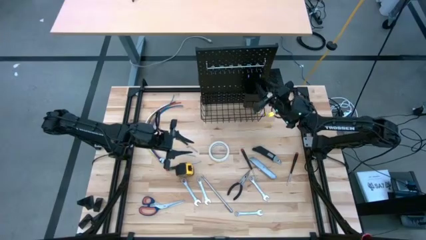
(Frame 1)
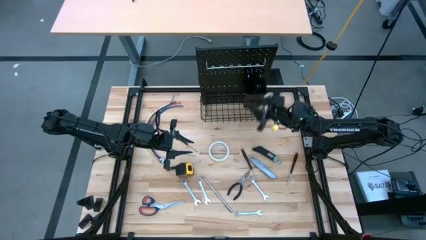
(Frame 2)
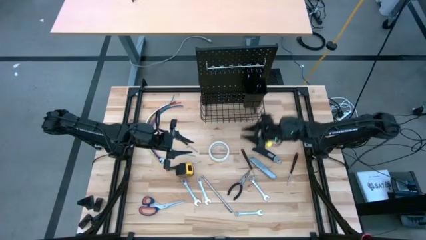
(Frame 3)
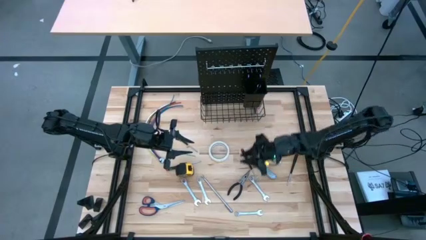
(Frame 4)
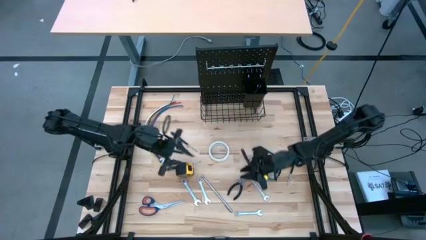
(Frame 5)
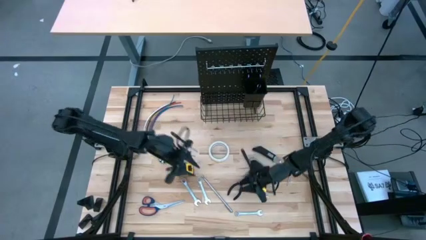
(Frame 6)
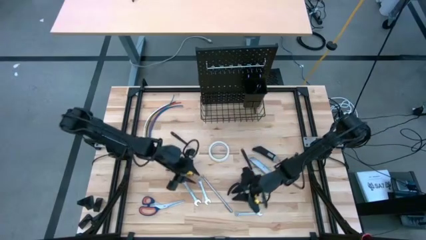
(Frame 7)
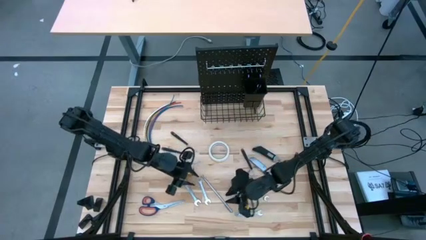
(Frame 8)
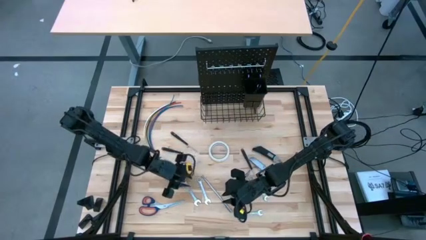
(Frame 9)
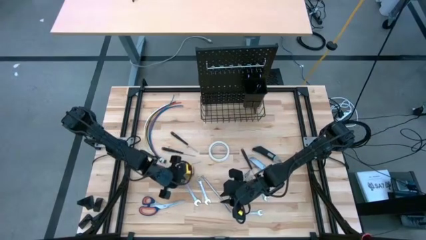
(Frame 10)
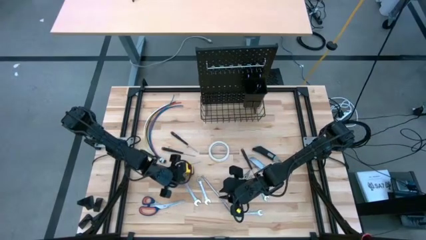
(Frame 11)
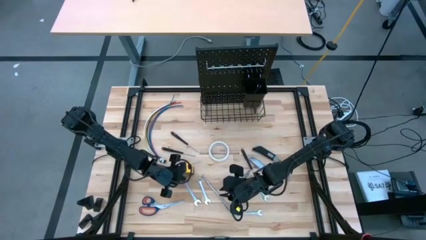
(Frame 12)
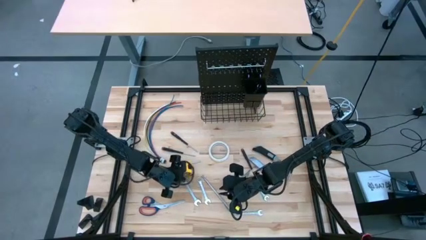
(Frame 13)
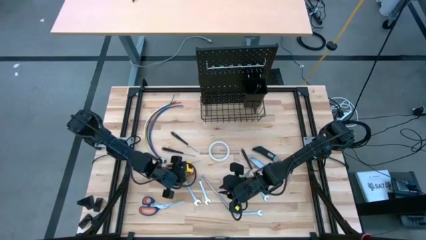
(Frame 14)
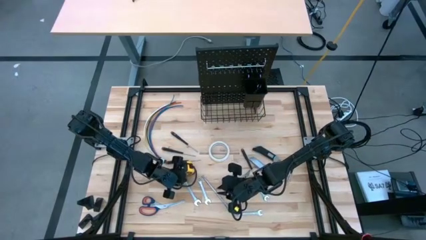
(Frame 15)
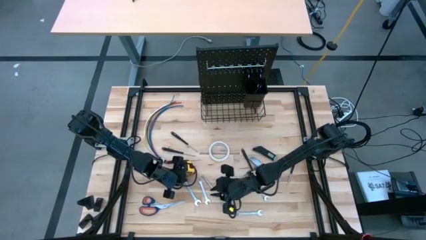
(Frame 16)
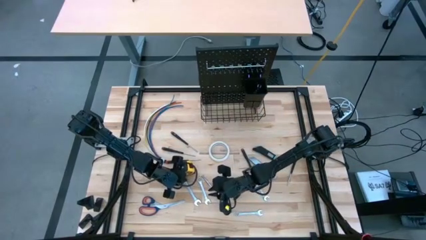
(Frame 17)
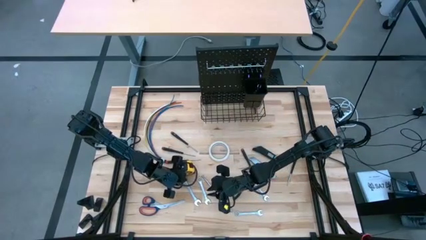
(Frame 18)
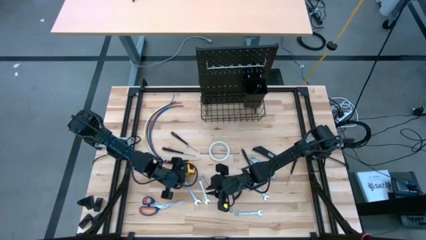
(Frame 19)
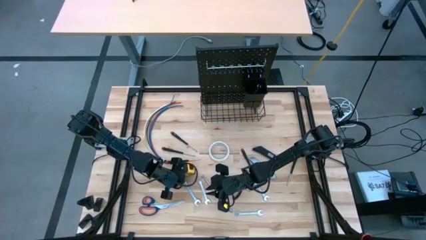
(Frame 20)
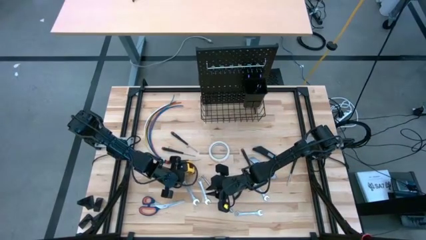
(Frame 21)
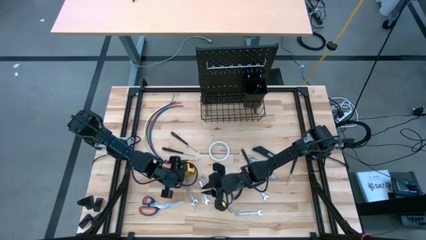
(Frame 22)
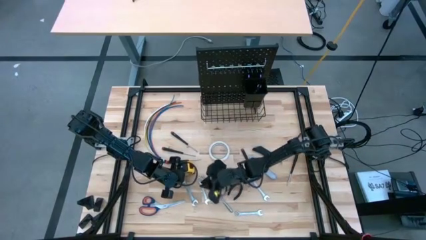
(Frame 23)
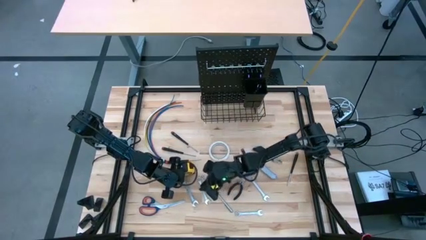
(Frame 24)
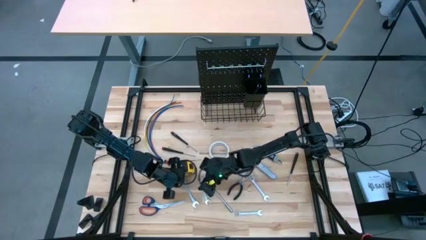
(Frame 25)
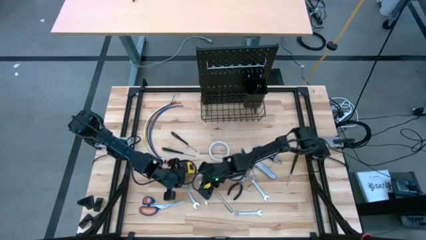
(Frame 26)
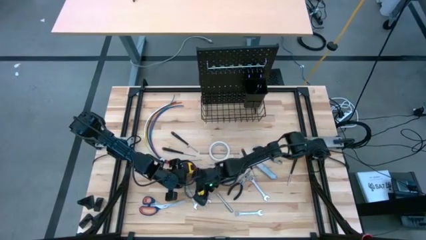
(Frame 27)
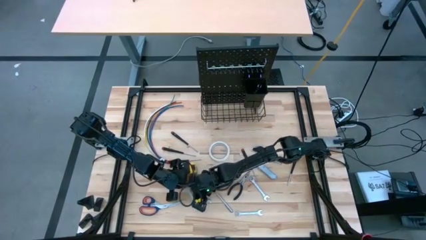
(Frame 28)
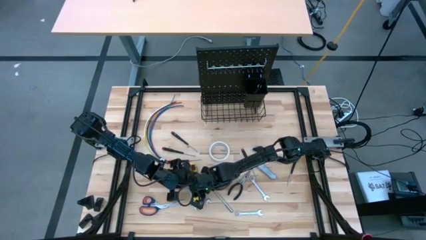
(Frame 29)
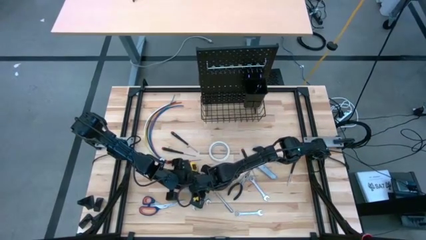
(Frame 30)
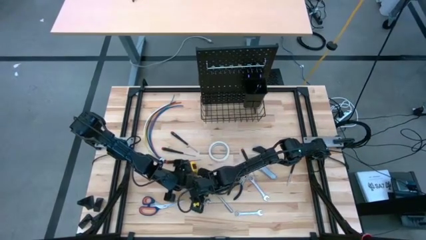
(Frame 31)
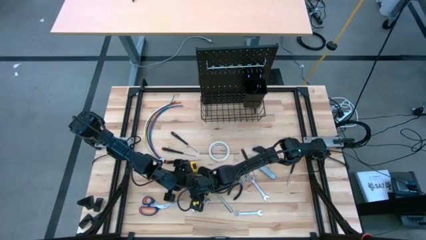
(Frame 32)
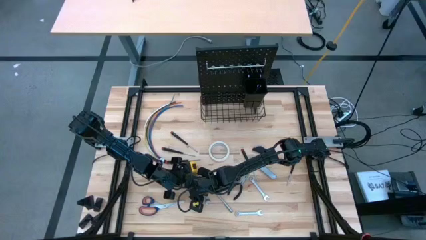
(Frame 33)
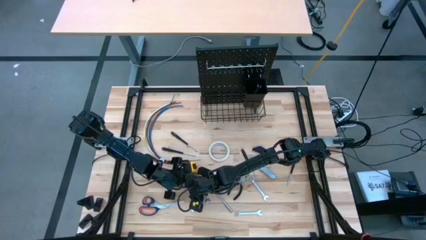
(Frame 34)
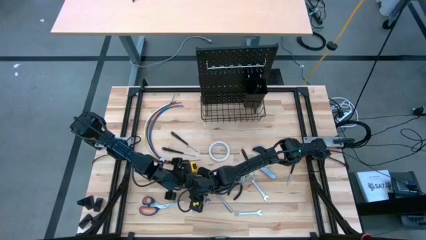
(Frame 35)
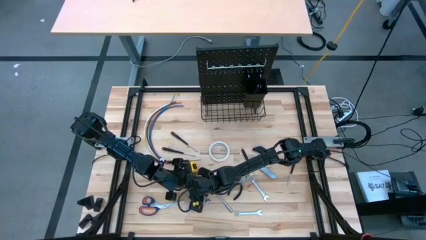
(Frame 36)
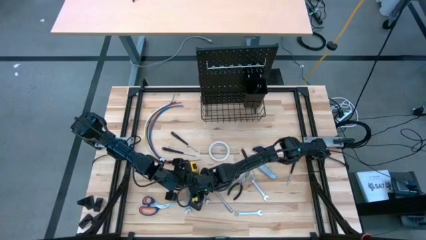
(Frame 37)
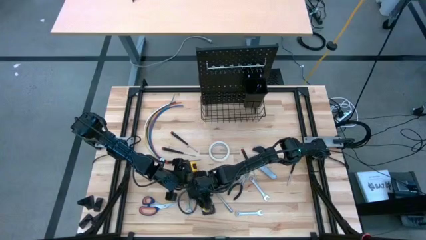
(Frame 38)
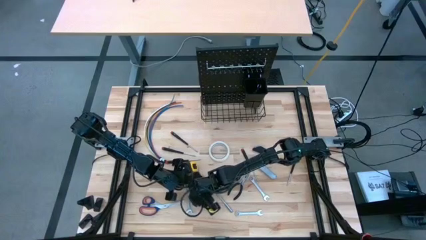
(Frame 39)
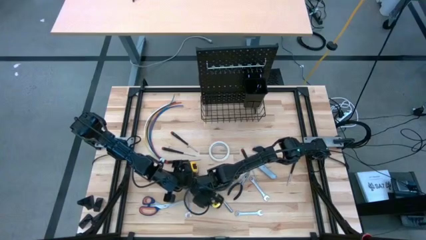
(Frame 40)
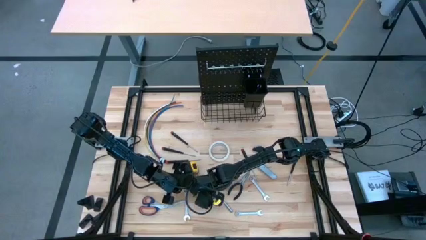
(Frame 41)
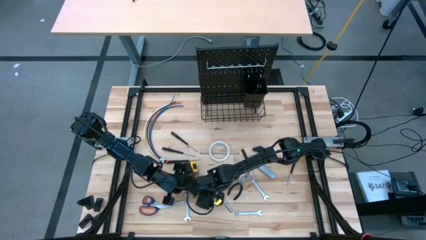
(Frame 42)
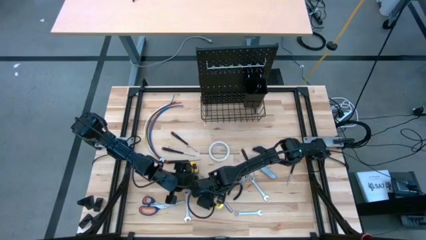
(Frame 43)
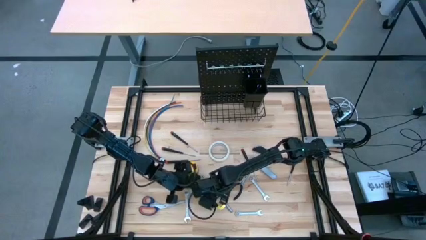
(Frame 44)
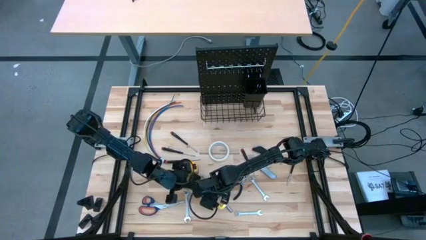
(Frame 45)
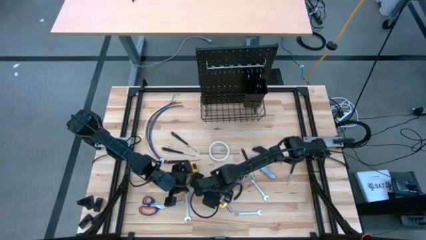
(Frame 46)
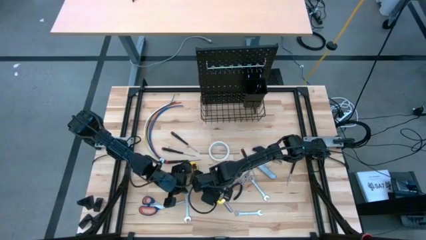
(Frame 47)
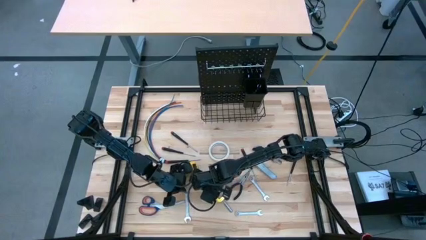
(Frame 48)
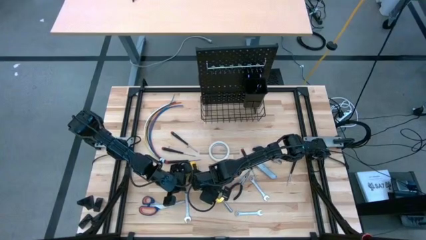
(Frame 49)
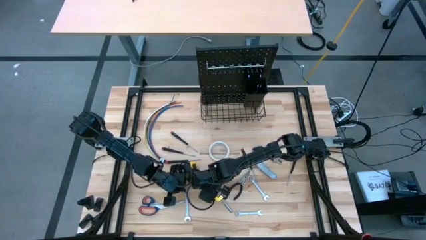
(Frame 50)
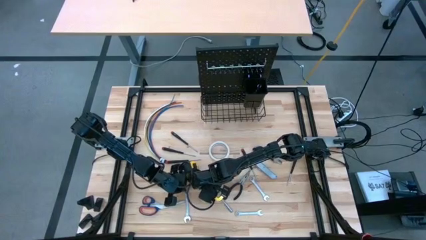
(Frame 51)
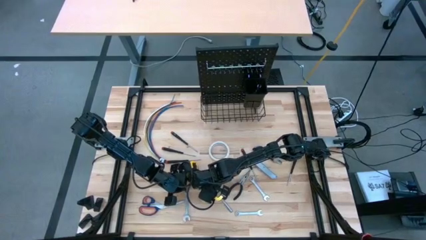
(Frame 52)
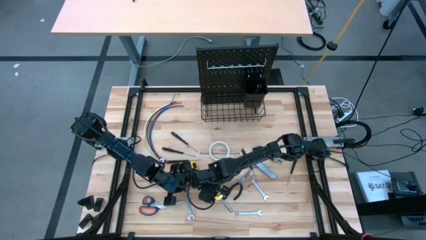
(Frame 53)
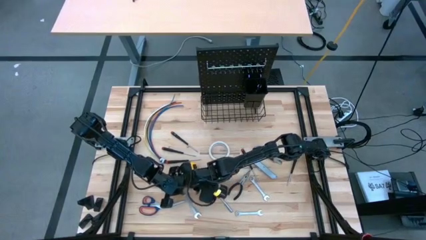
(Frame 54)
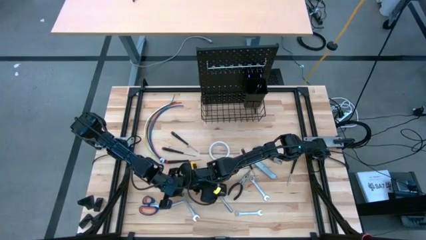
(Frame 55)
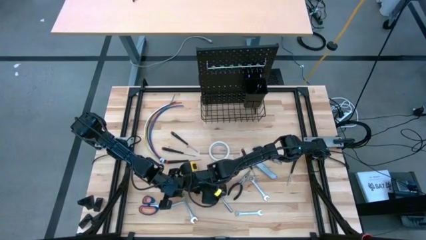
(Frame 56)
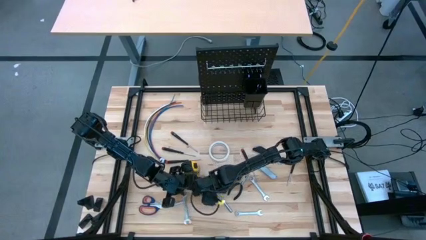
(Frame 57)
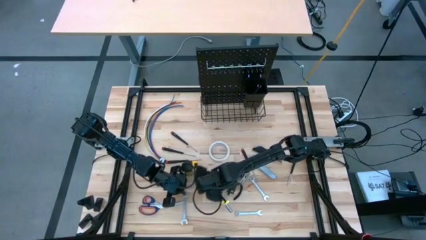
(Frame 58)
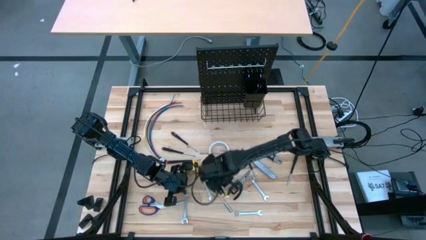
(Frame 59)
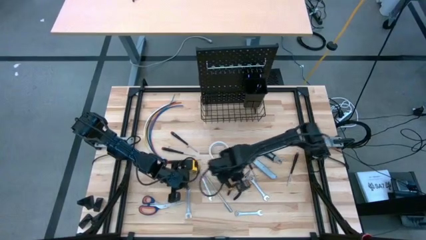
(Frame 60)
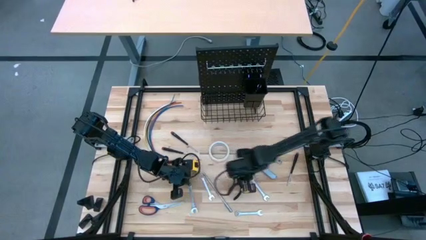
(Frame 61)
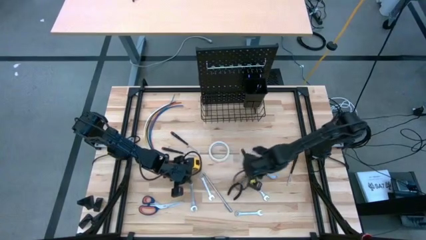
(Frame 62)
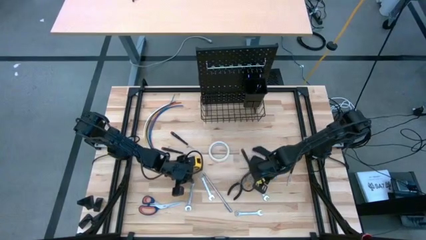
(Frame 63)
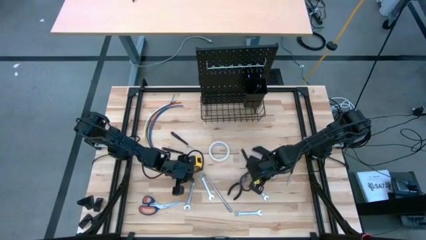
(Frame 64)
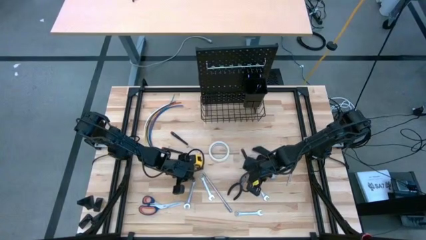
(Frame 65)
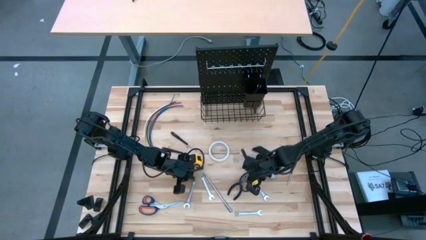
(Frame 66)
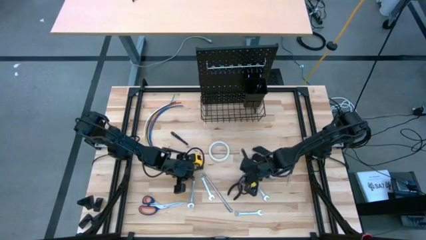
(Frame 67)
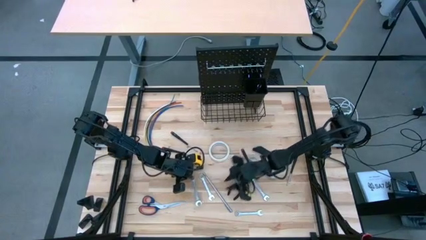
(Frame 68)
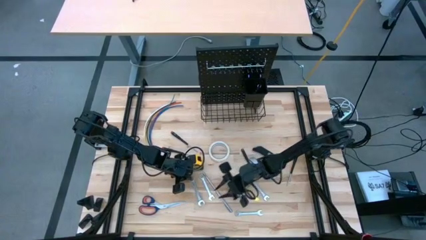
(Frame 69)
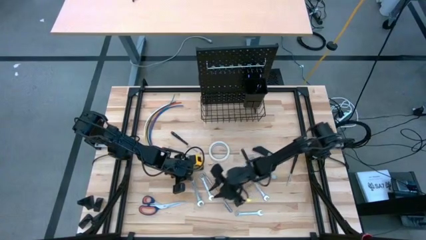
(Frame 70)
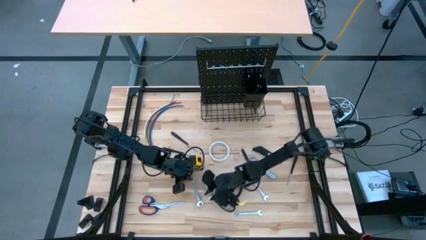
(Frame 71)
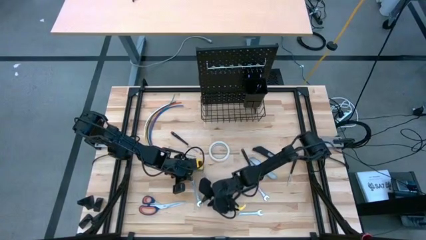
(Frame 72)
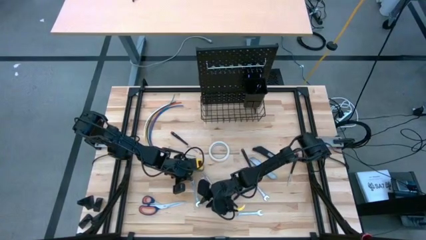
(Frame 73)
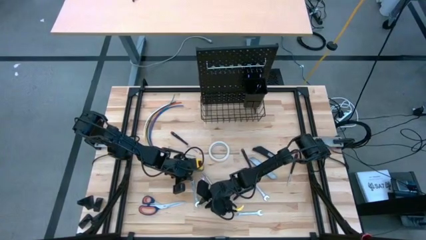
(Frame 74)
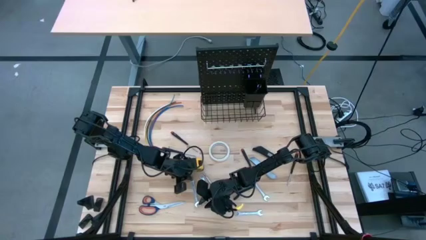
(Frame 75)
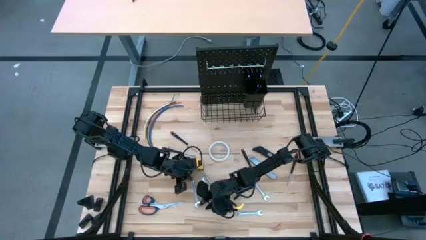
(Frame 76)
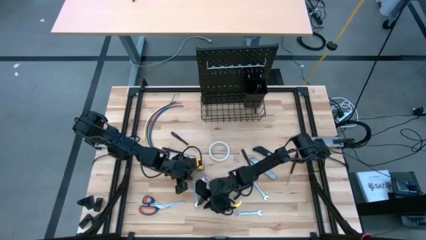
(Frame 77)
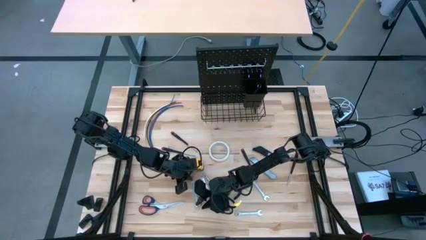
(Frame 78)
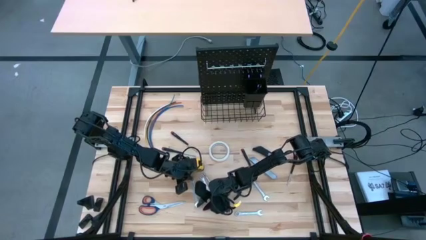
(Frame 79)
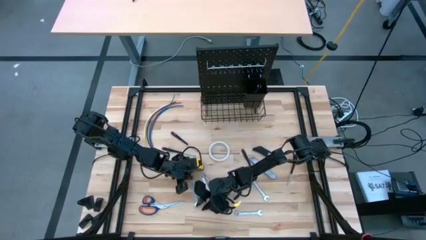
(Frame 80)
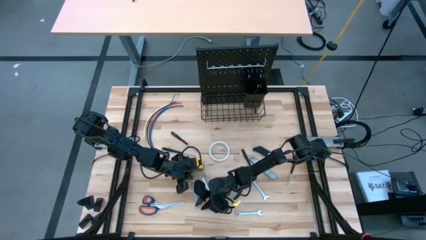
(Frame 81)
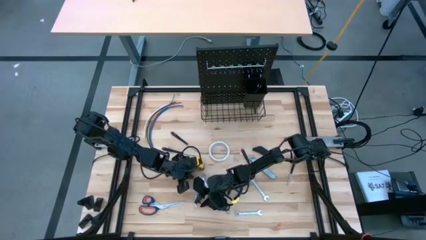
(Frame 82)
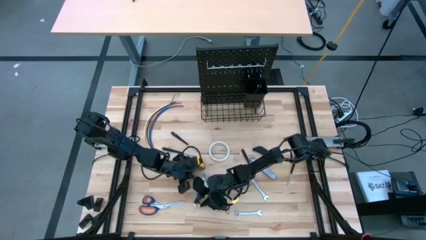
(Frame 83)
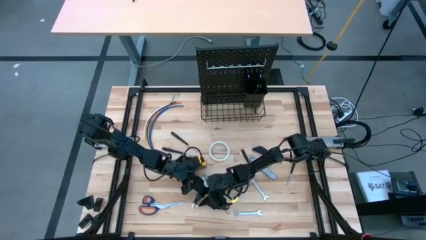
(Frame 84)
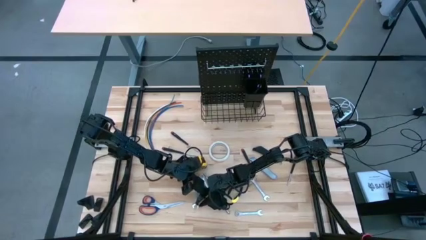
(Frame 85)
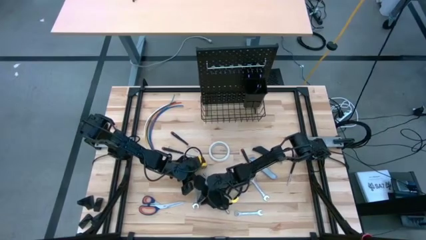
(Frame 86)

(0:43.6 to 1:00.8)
Task: Hang tools onto peg board
Put the wrench into the black bin on the peg board
